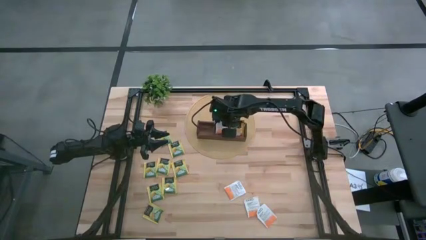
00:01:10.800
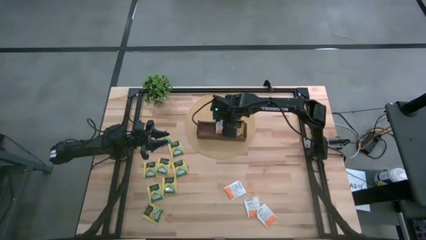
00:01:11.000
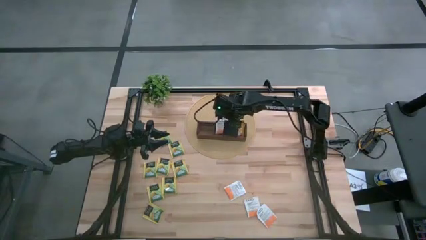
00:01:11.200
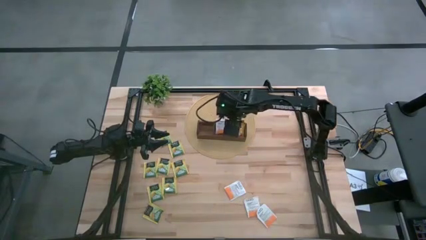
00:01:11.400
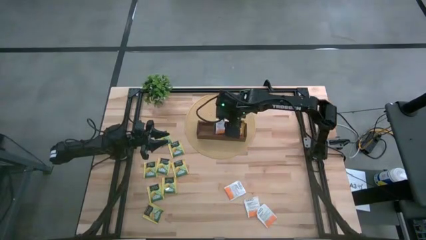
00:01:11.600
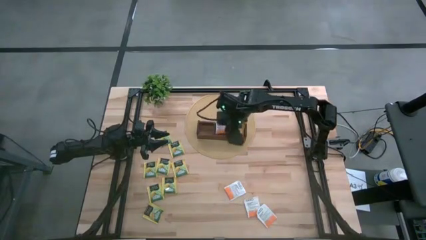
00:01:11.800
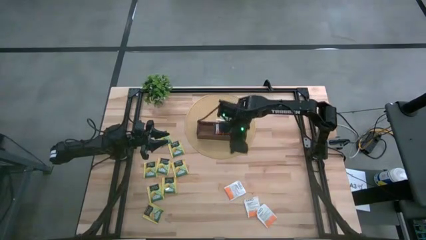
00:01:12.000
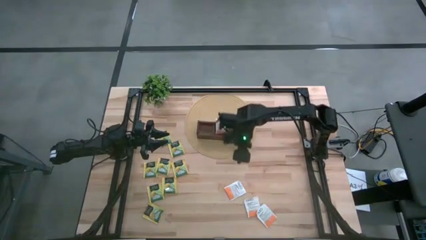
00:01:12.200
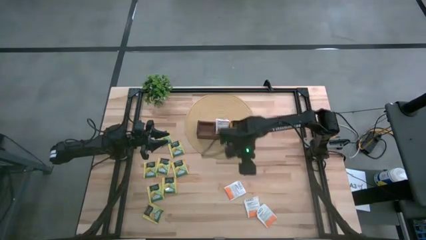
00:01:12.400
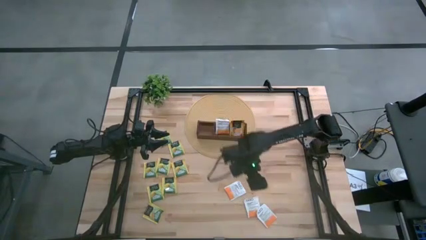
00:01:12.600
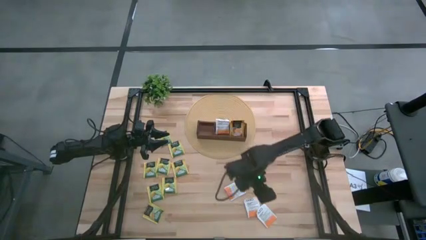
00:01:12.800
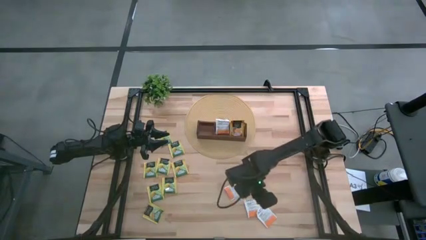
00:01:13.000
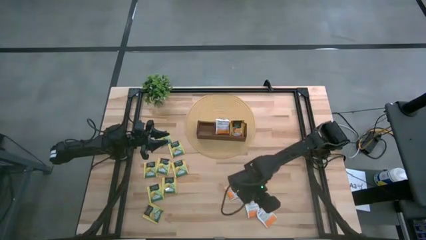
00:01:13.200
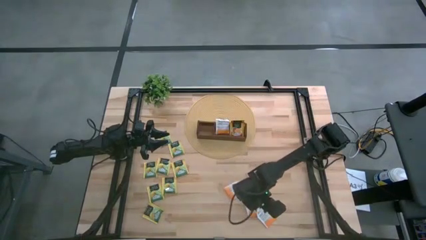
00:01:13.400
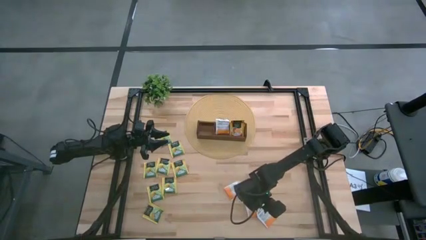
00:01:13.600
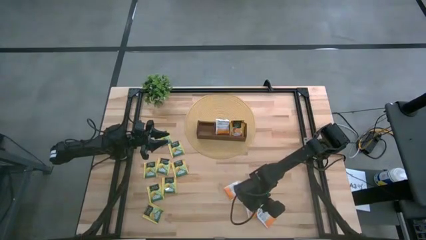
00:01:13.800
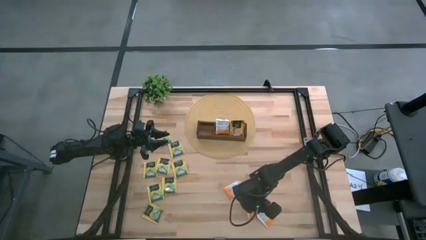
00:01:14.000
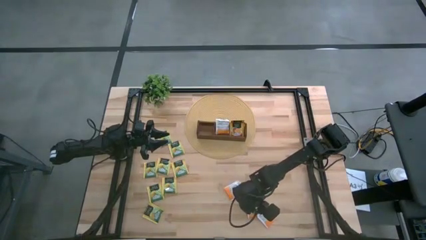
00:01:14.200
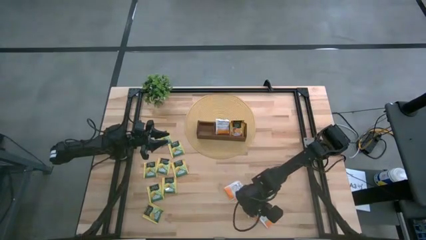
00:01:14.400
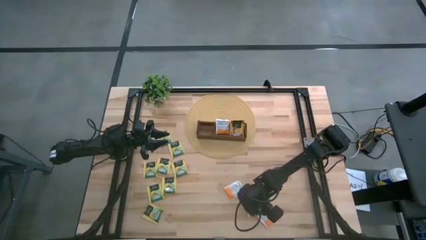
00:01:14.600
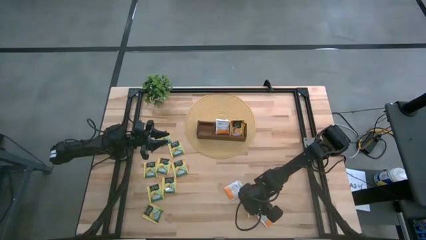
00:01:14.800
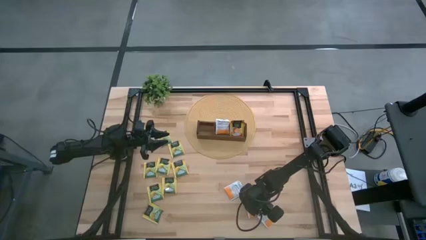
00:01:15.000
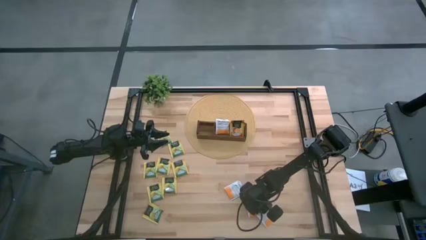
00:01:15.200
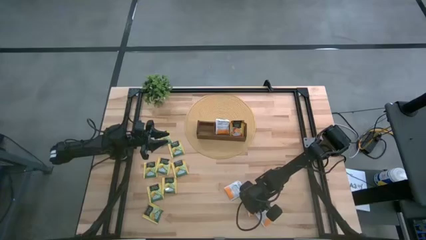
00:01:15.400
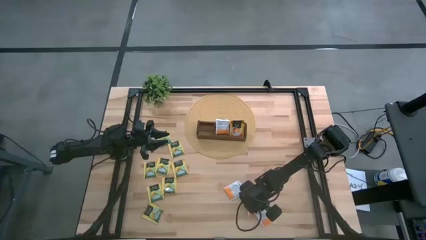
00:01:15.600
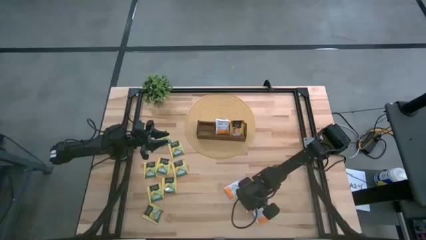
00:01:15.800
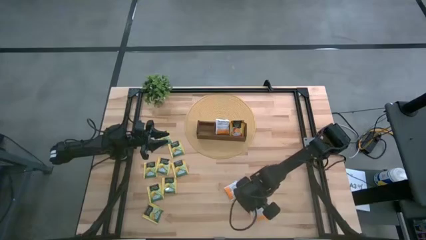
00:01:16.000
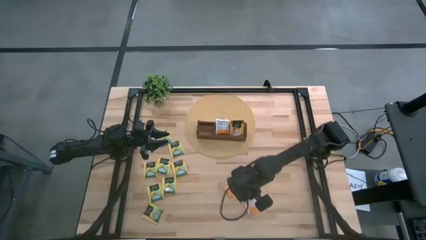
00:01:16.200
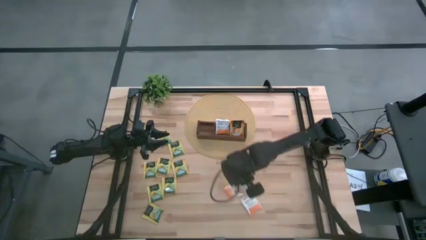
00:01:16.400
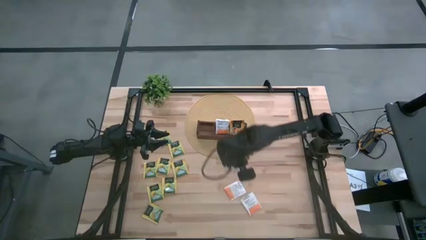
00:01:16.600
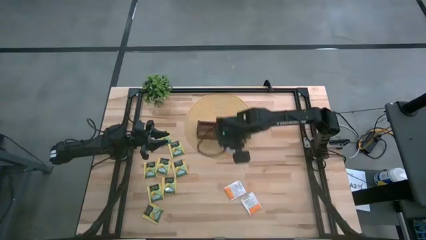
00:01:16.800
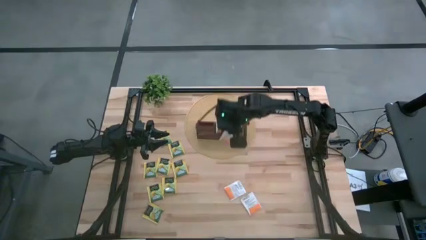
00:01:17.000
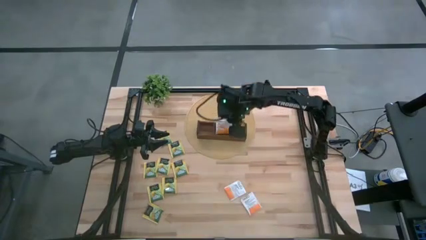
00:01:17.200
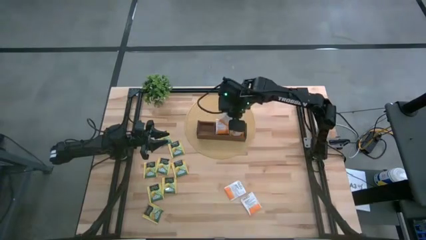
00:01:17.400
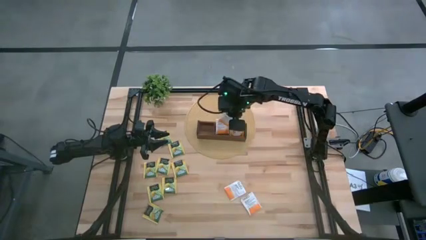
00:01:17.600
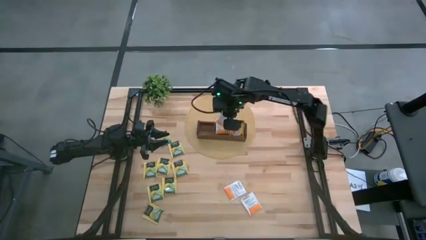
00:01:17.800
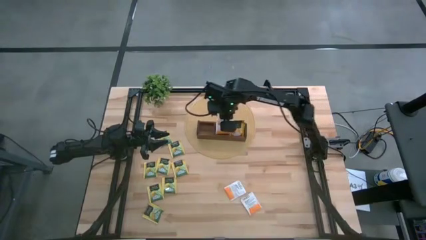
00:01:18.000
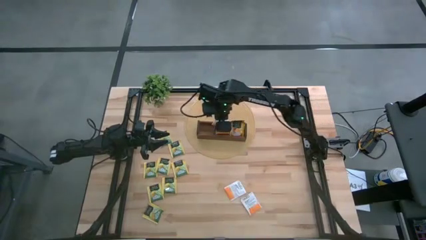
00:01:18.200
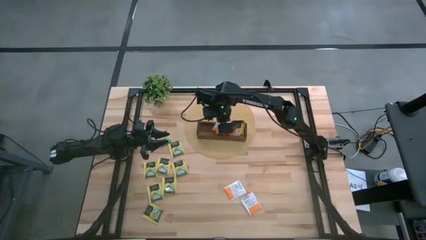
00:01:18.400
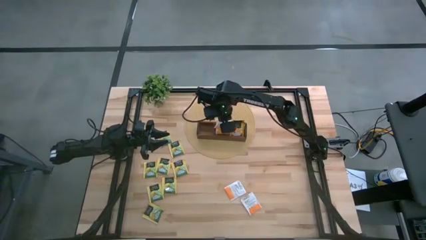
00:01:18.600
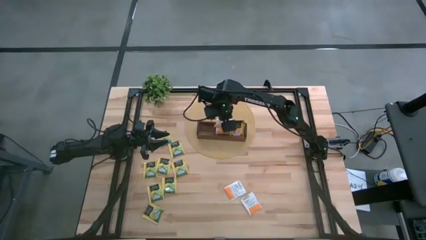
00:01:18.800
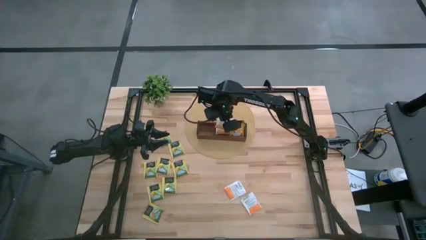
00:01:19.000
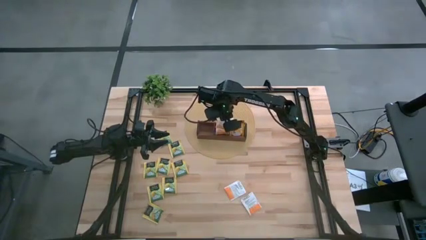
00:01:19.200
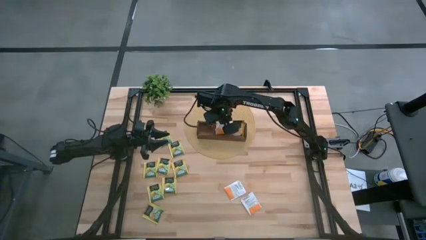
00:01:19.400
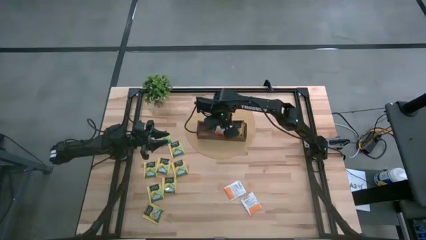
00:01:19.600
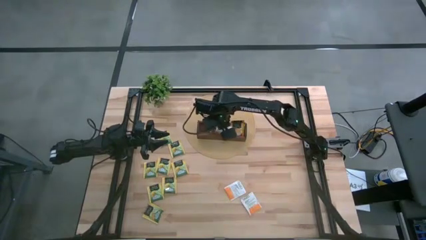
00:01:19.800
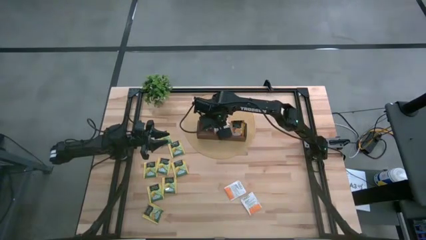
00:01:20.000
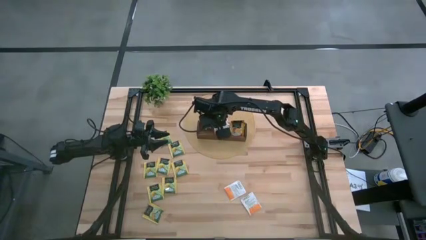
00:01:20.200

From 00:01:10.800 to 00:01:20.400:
Task: Pick & Place Tea
Put the white tea bag into the middle section of the wooden organizer

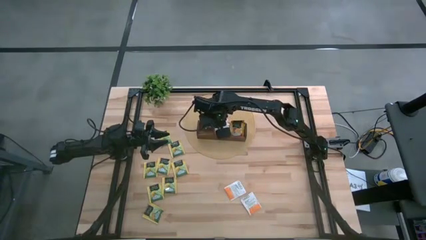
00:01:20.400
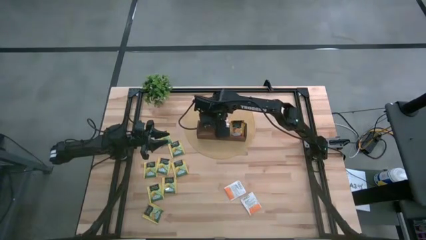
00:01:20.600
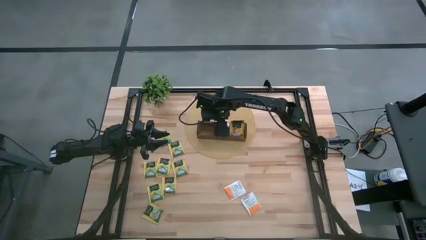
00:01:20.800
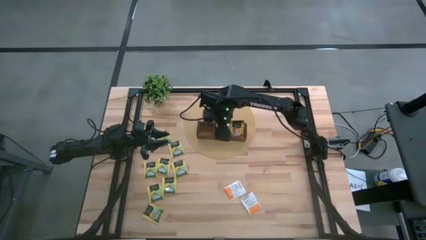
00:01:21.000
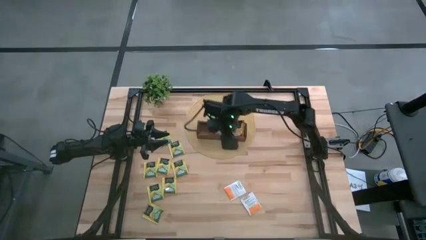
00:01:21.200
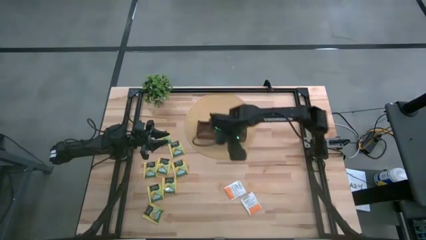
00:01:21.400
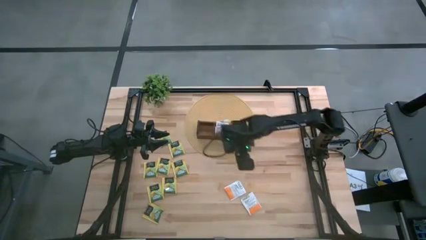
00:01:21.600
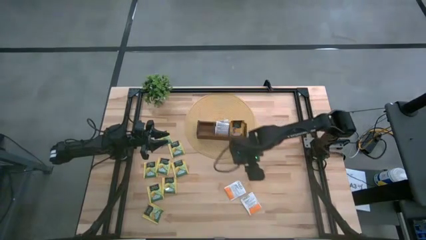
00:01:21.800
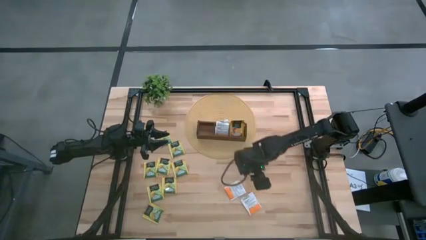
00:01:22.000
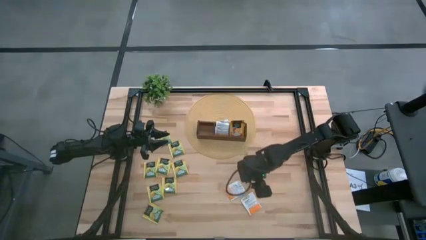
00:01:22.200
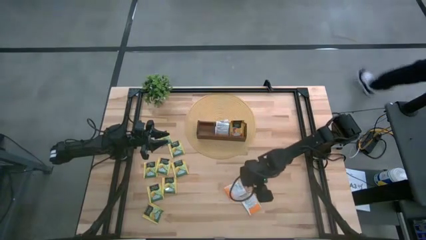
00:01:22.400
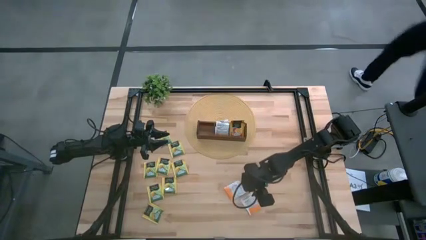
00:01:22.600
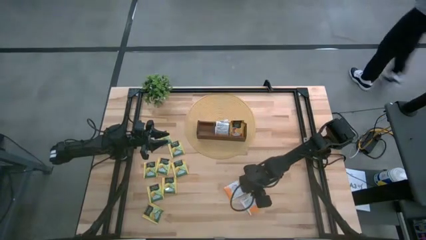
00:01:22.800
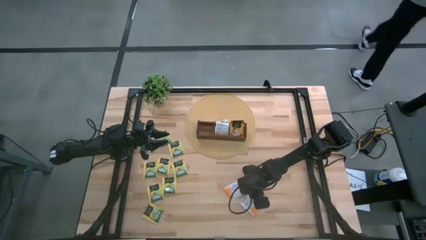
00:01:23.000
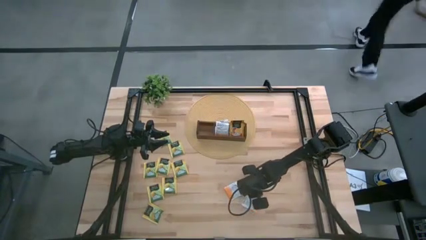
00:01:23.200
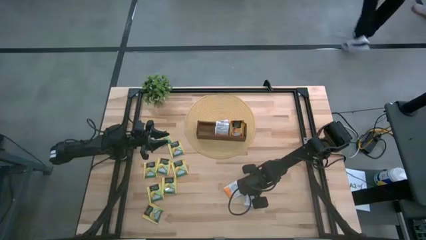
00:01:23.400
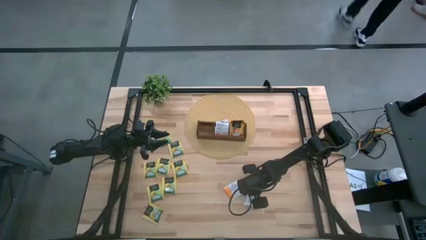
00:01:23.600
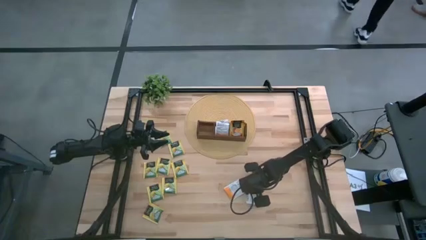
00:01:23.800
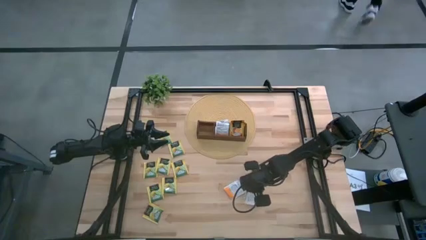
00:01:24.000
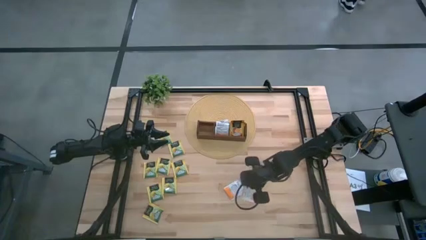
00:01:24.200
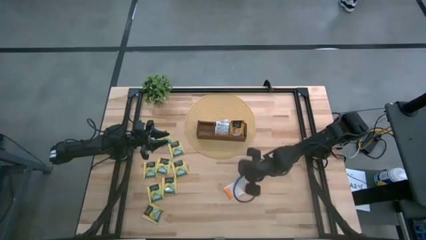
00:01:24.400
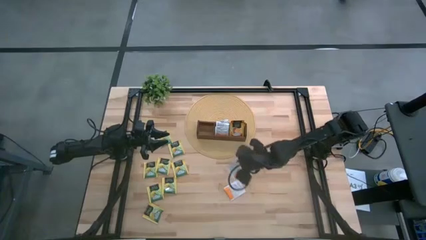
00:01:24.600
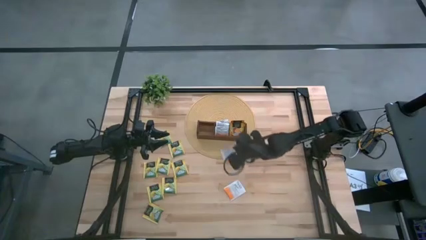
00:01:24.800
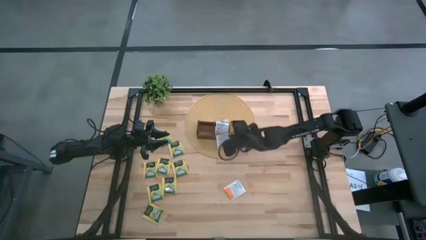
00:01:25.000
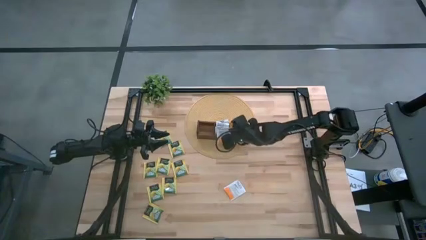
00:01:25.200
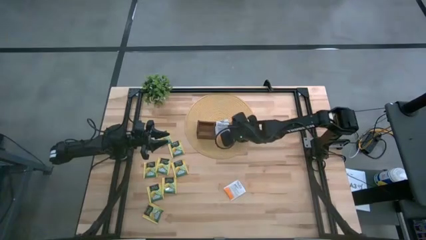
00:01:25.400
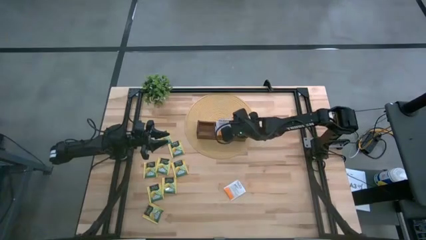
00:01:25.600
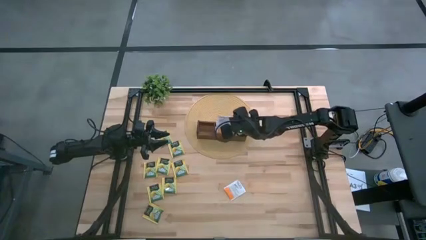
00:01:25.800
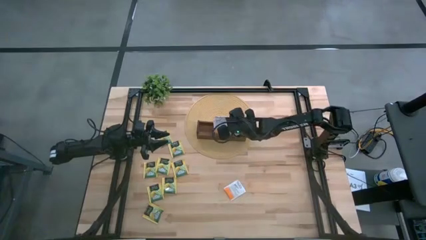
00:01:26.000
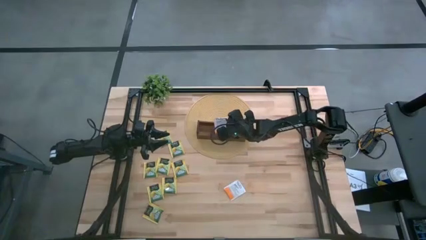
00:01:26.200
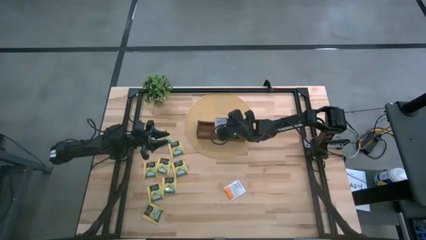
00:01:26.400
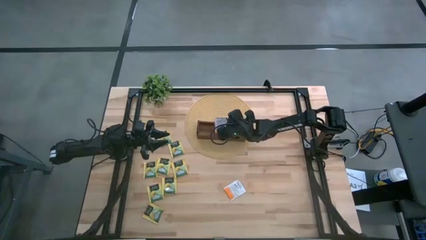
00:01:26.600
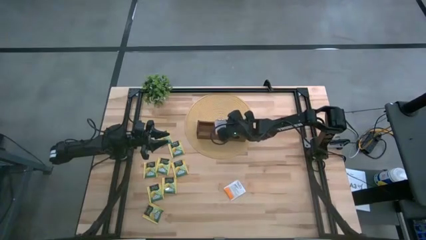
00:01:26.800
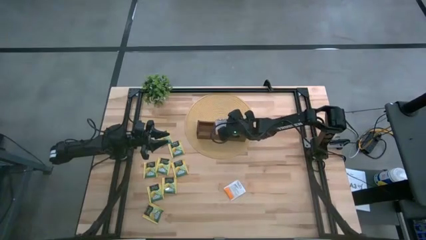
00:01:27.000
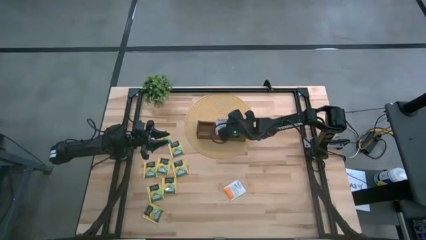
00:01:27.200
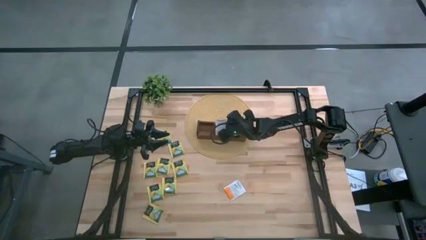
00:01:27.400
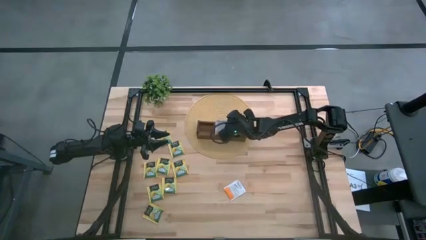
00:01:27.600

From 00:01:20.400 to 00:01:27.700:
Put the white tea bag into the middle section of the wooden organizer
